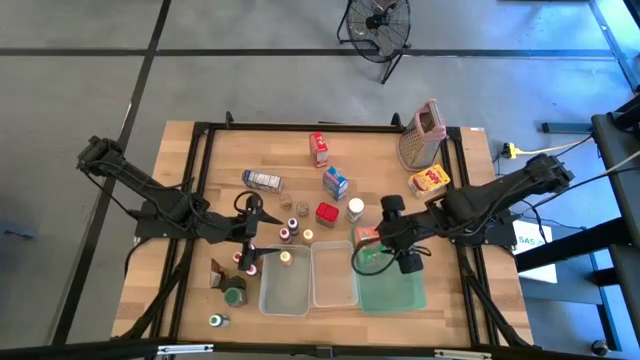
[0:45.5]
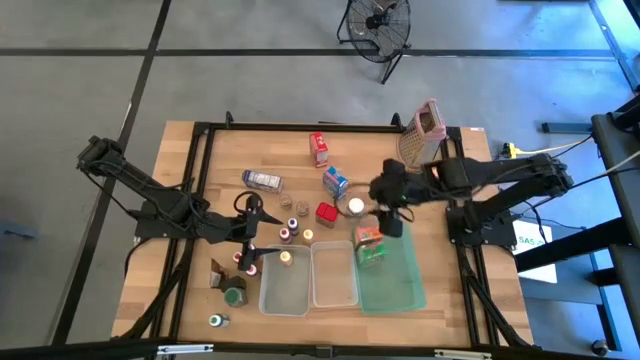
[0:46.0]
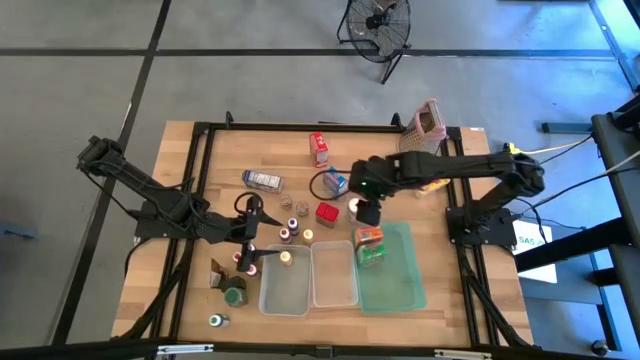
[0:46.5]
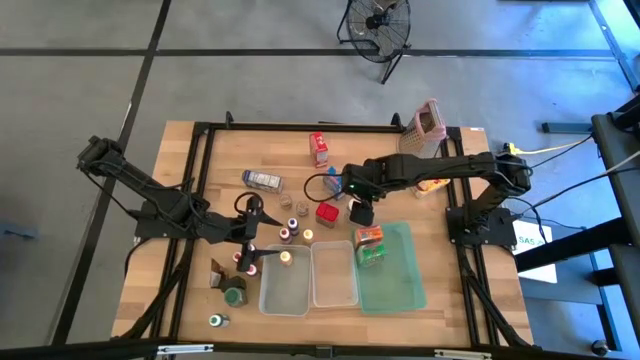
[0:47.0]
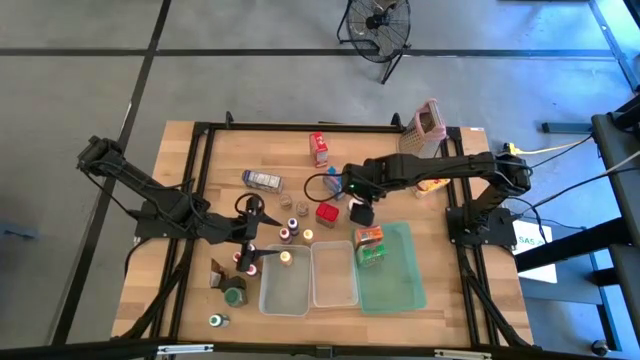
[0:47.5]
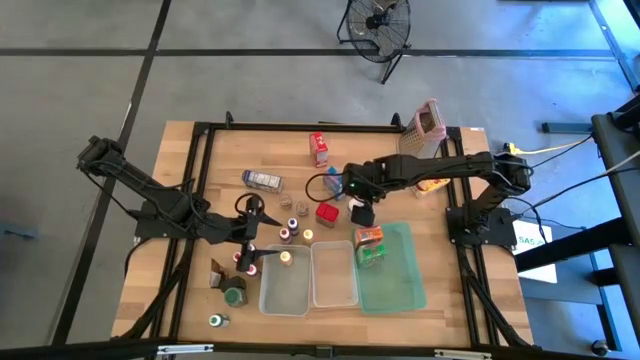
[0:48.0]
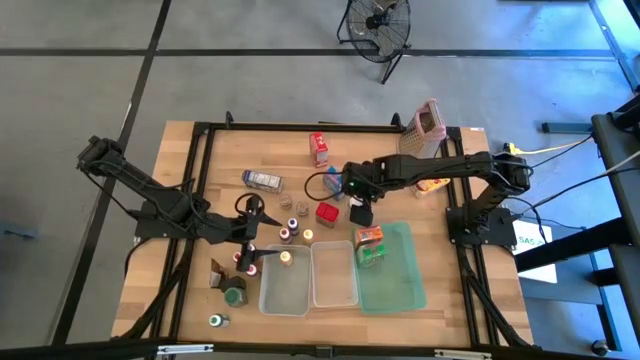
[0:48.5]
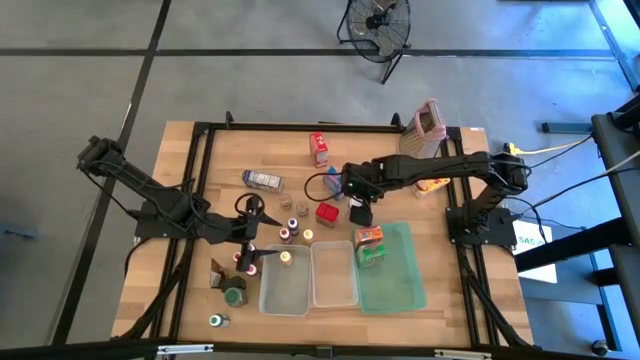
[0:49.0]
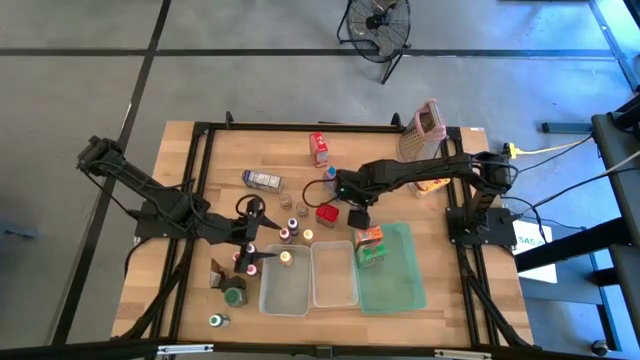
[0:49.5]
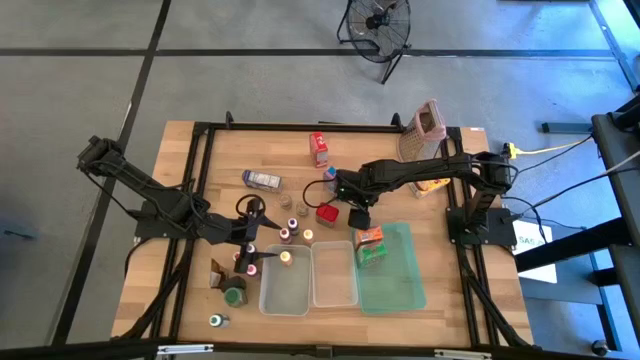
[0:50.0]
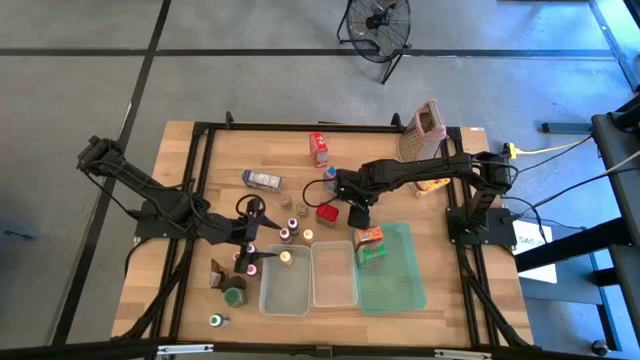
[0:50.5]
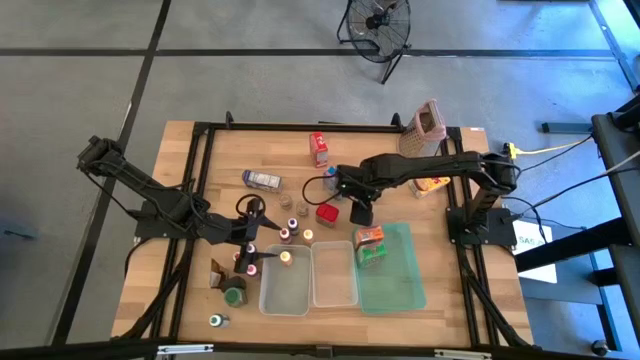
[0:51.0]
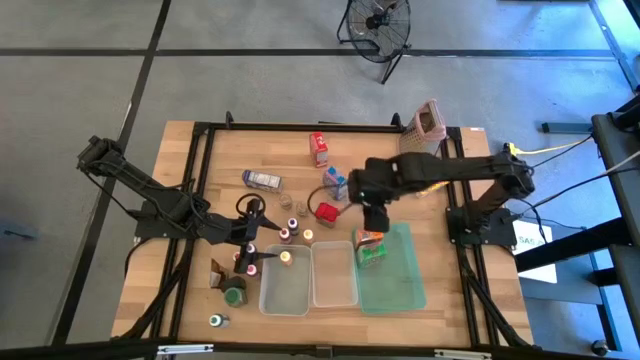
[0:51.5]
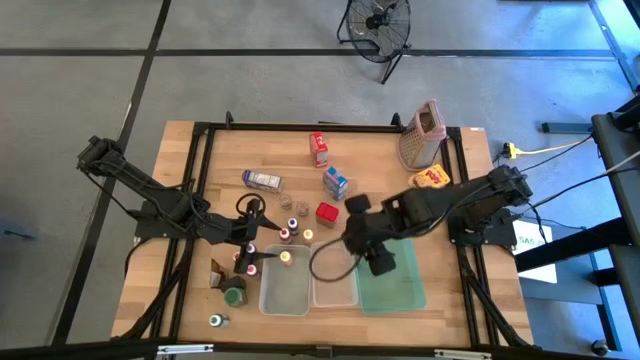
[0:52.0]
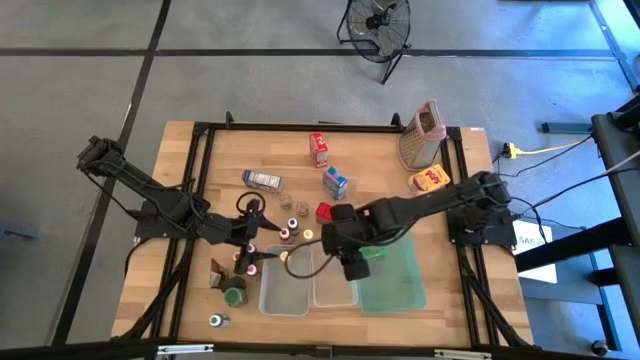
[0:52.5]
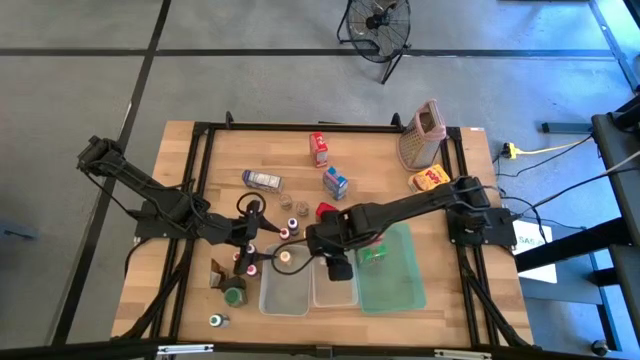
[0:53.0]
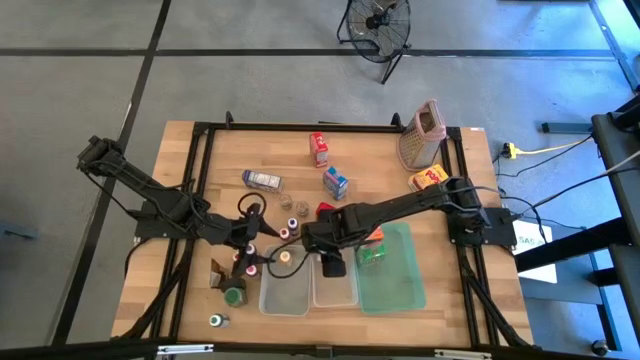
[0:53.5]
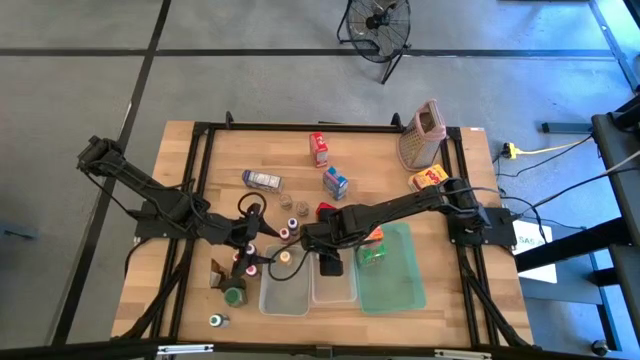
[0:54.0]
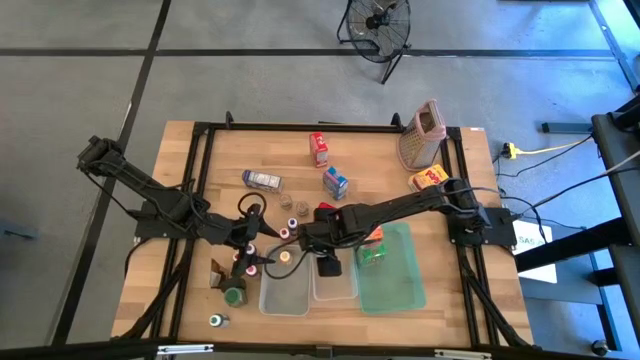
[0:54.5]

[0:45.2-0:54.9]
Task: Pick & Place Kitchen Items
Put the white seasoning bottle into the white bin

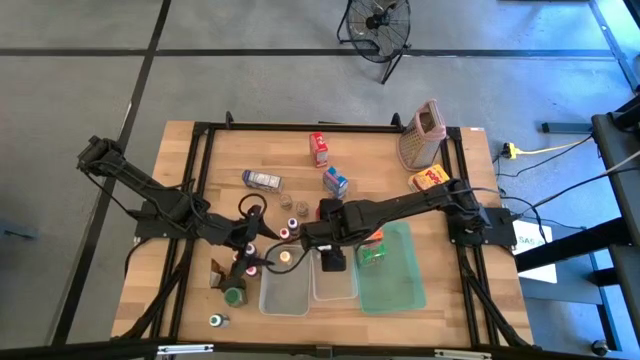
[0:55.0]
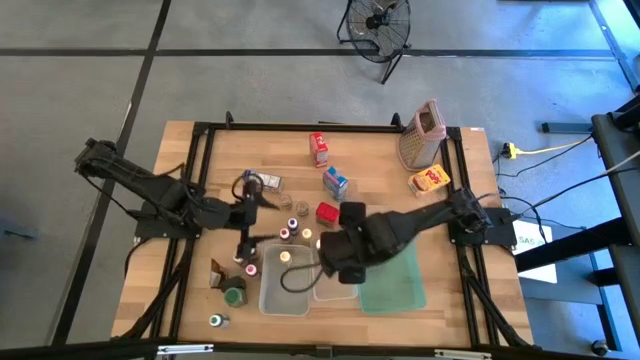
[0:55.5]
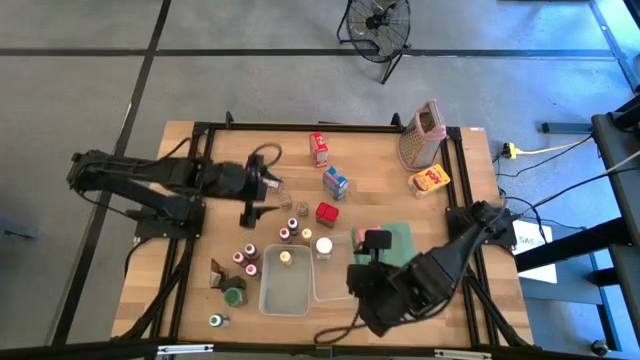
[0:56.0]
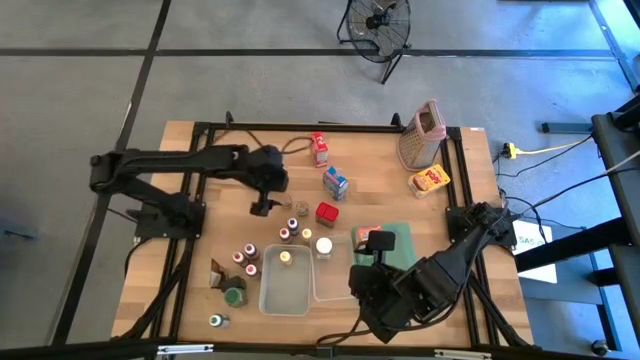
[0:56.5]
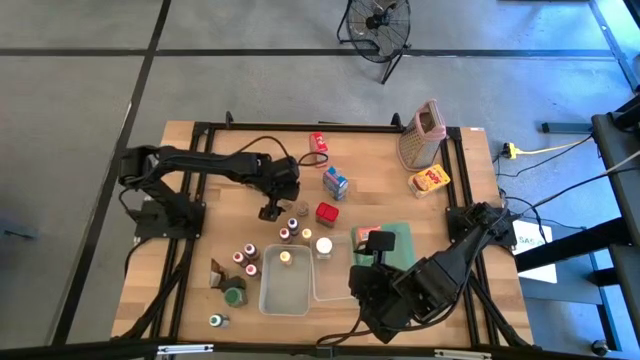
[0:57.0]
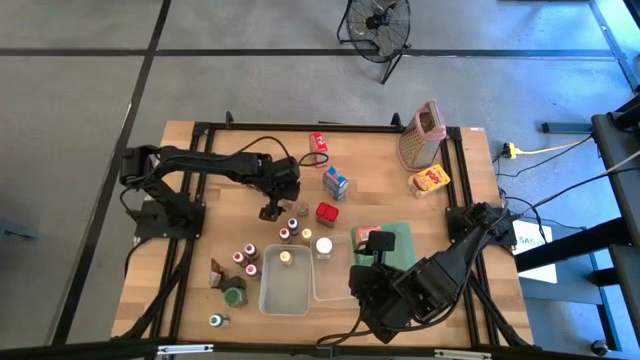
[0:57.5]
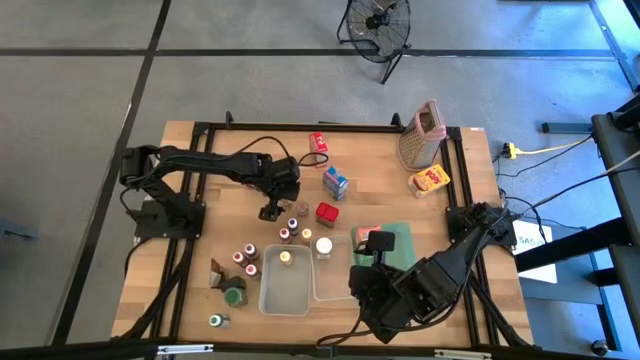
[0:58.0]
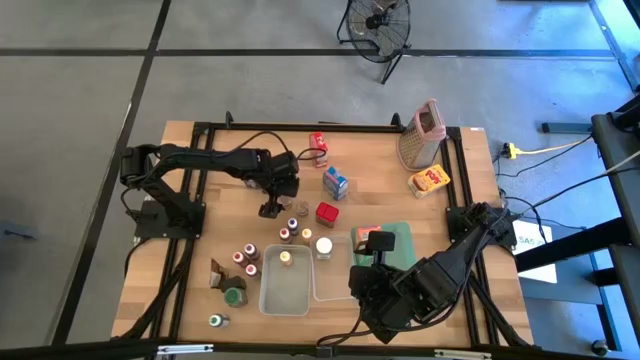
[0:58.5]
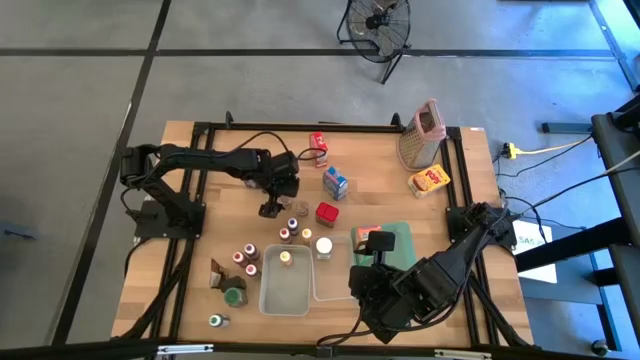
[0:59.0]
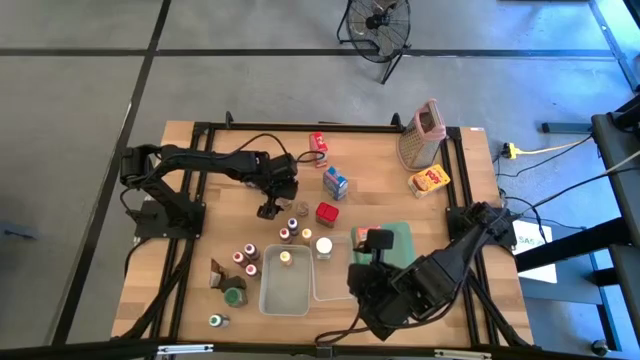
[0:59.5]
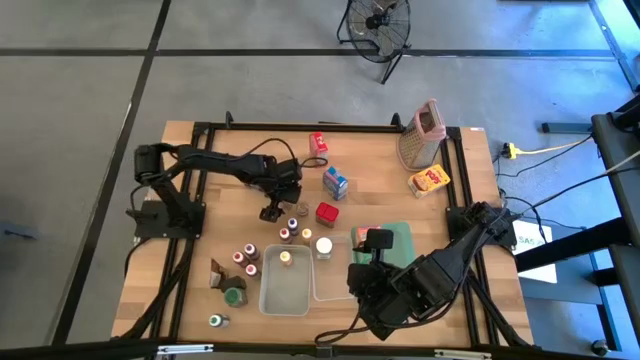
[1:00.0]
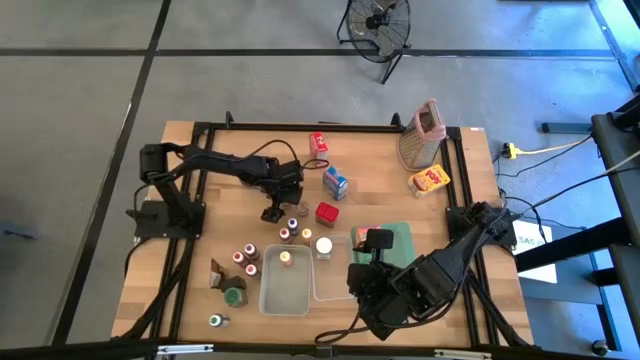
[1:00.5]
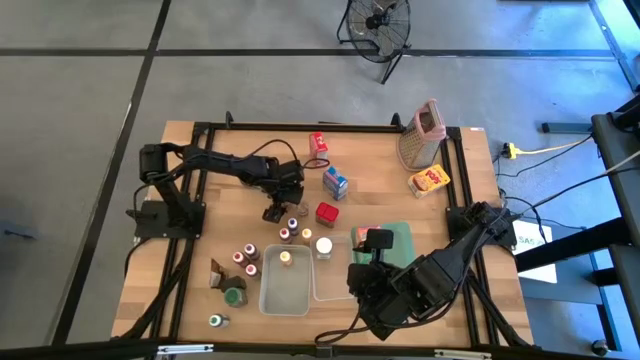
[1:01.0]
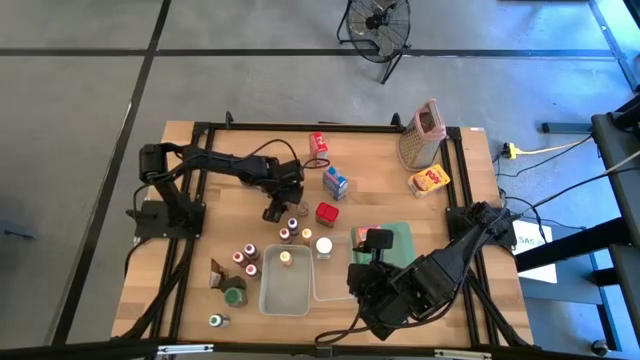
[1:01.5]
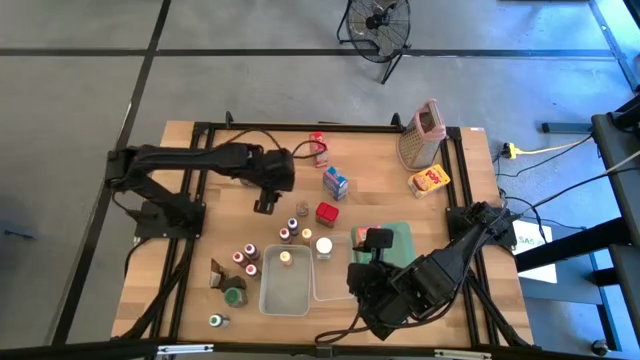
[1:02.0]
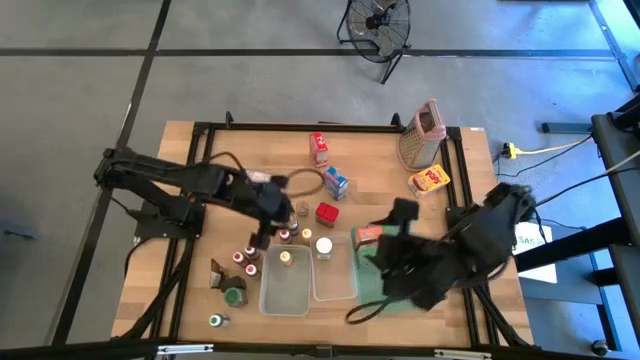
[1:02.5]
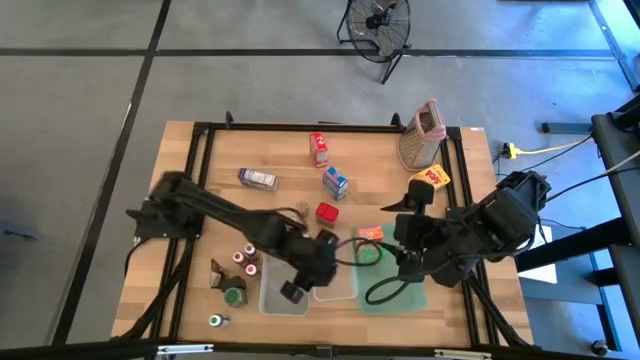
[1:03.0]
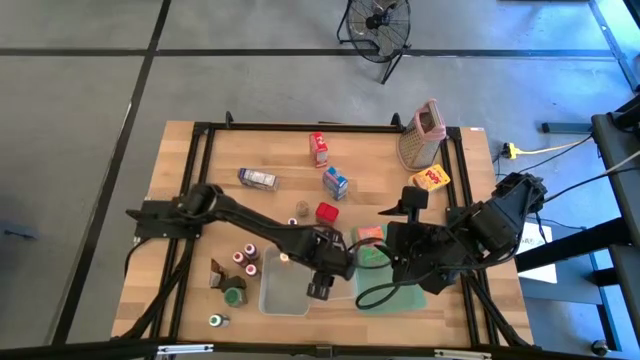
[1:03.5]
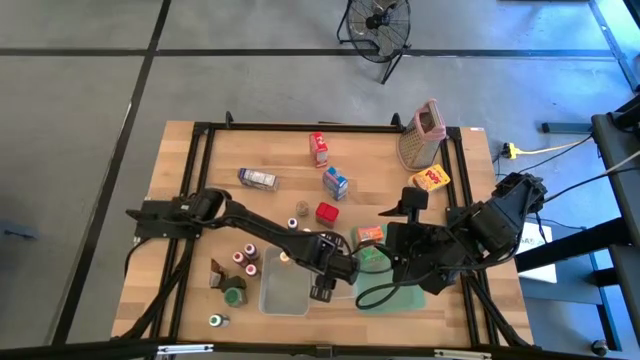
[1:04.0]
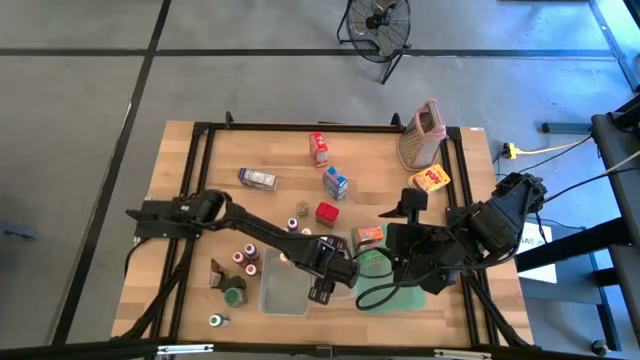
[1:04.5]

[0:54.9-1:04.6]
Put the brown seasoning bottle into the white bin
